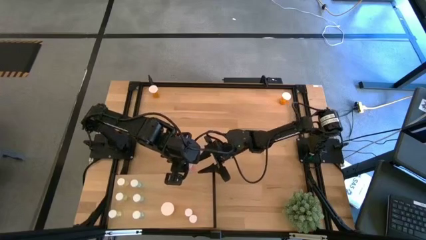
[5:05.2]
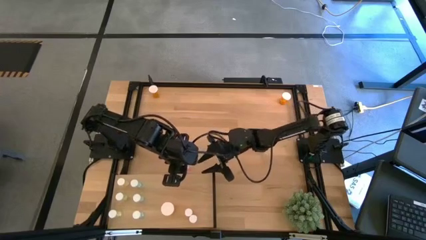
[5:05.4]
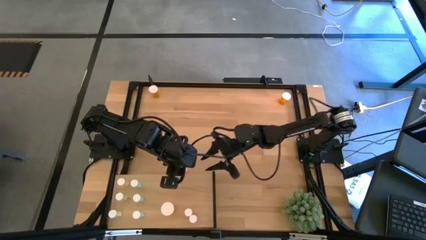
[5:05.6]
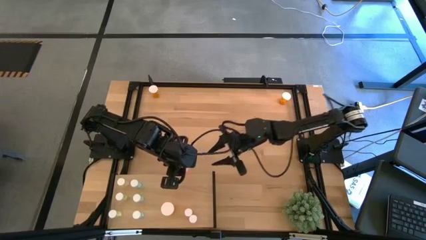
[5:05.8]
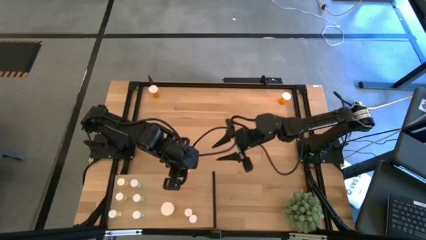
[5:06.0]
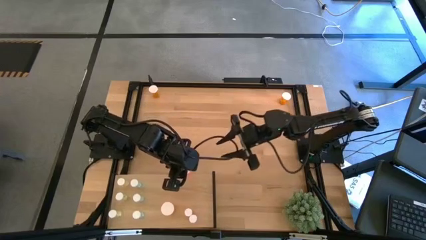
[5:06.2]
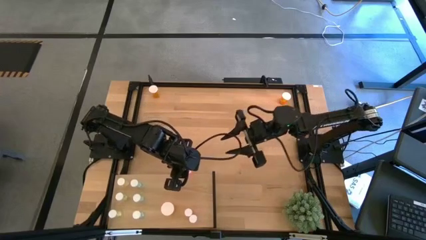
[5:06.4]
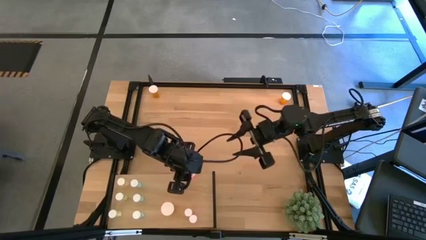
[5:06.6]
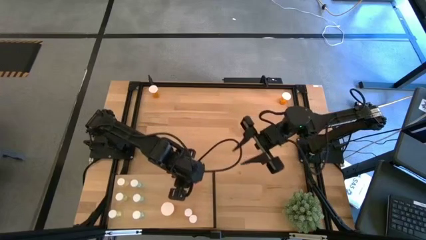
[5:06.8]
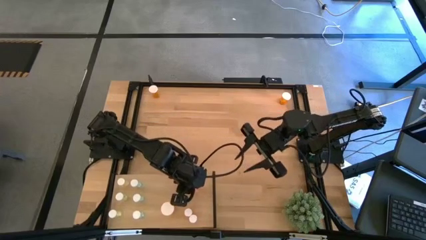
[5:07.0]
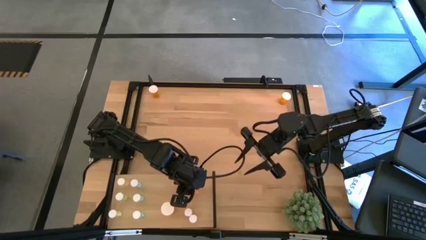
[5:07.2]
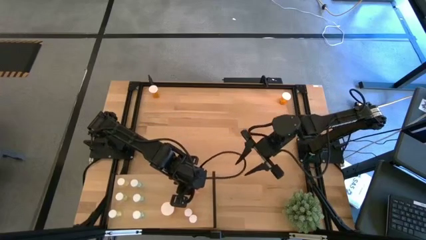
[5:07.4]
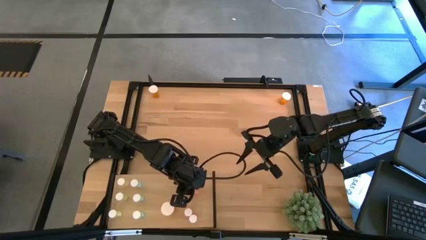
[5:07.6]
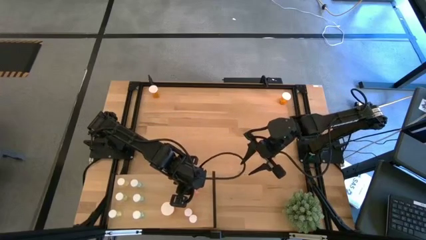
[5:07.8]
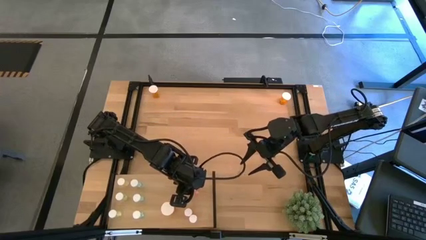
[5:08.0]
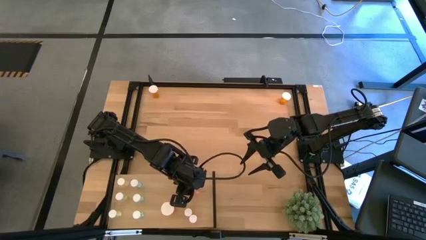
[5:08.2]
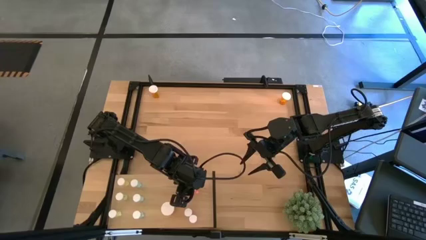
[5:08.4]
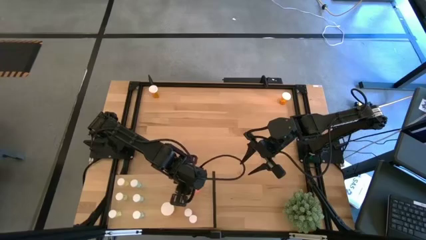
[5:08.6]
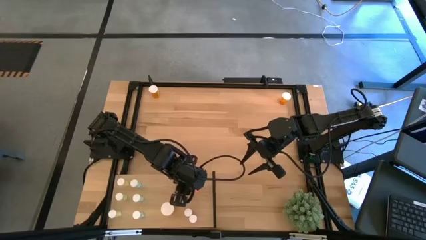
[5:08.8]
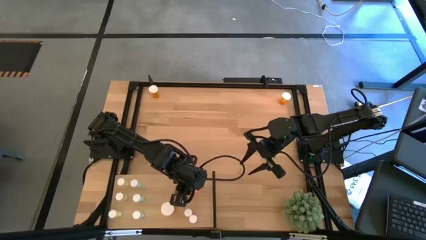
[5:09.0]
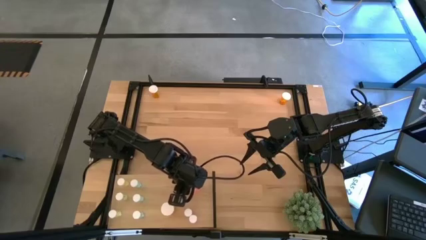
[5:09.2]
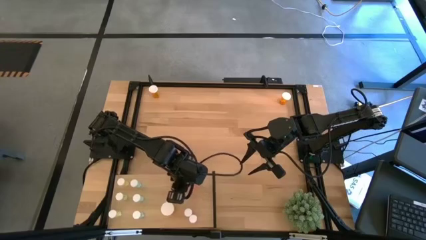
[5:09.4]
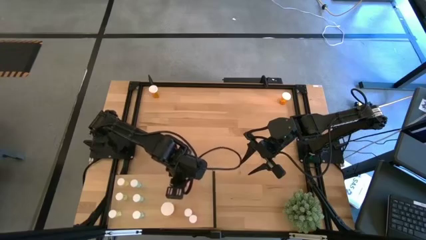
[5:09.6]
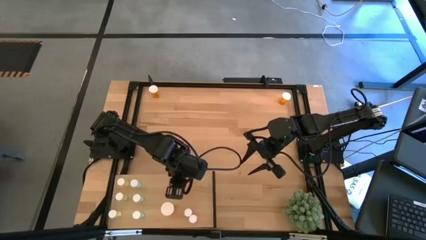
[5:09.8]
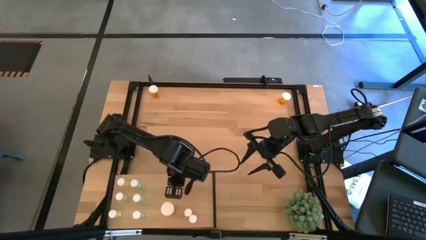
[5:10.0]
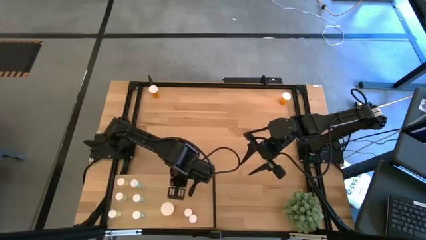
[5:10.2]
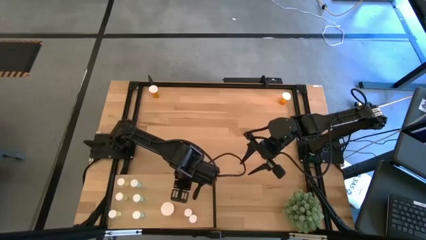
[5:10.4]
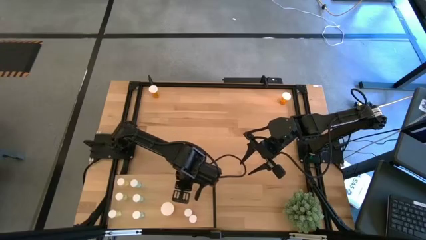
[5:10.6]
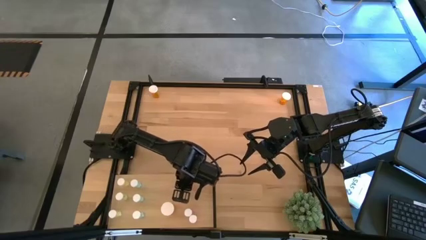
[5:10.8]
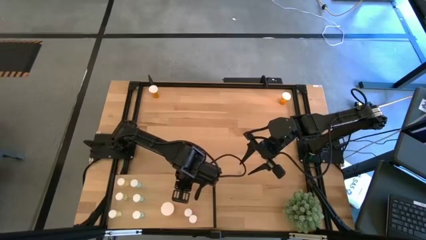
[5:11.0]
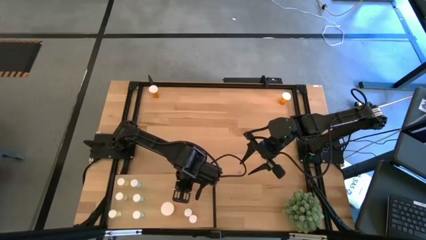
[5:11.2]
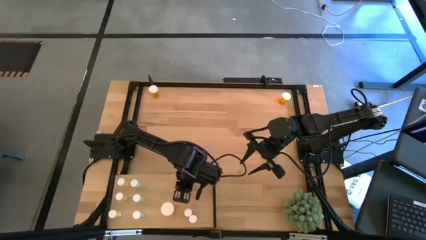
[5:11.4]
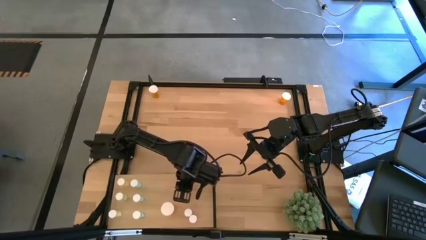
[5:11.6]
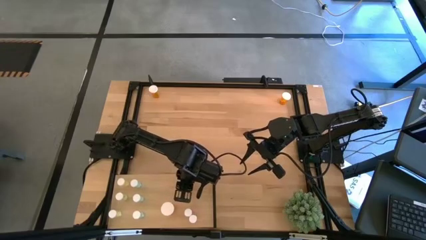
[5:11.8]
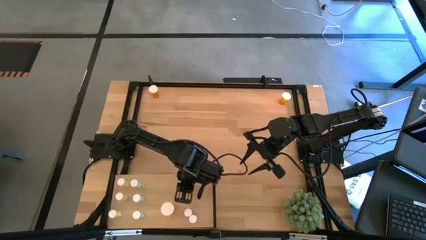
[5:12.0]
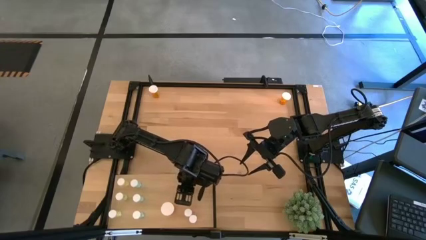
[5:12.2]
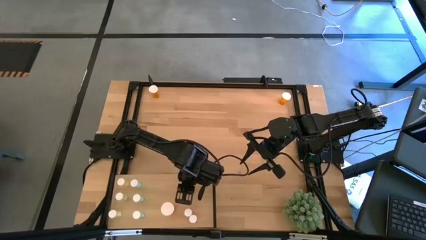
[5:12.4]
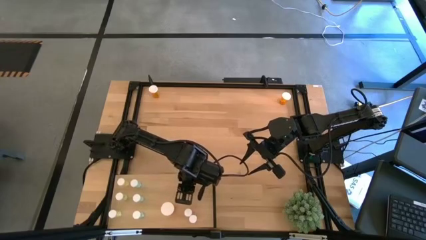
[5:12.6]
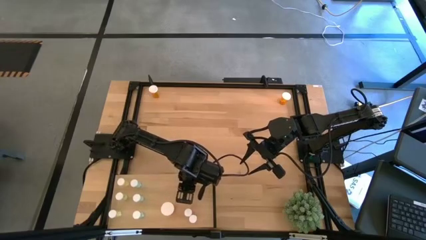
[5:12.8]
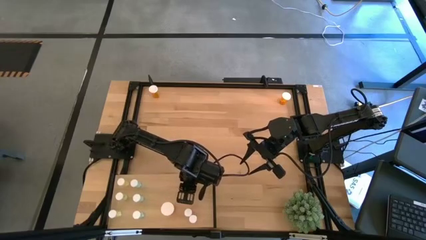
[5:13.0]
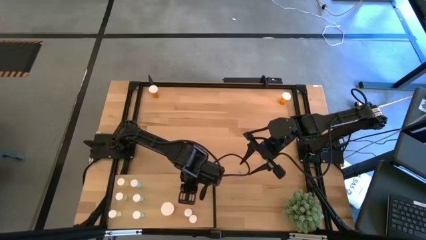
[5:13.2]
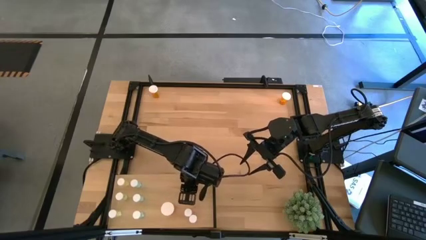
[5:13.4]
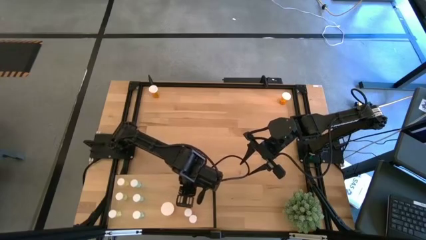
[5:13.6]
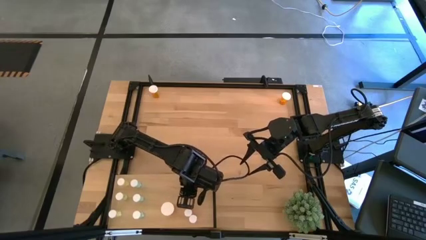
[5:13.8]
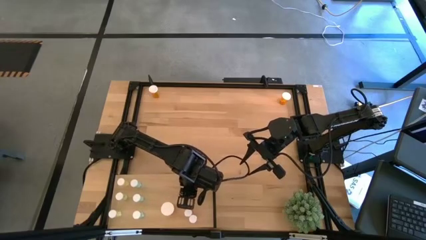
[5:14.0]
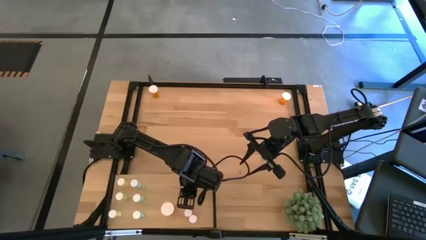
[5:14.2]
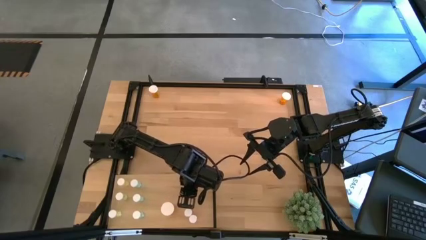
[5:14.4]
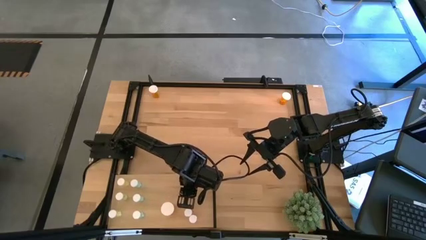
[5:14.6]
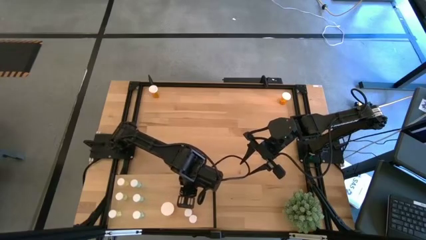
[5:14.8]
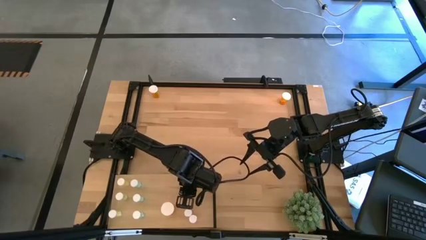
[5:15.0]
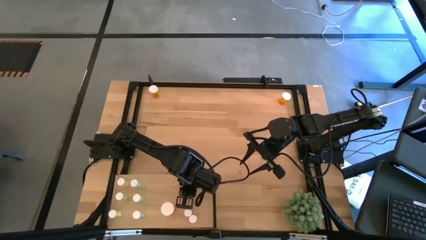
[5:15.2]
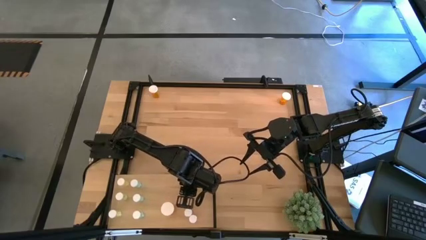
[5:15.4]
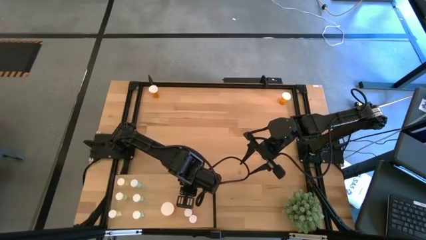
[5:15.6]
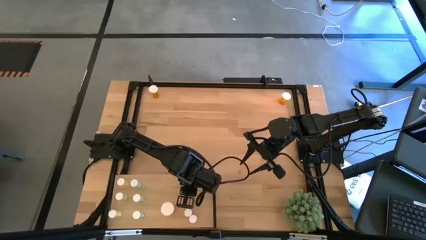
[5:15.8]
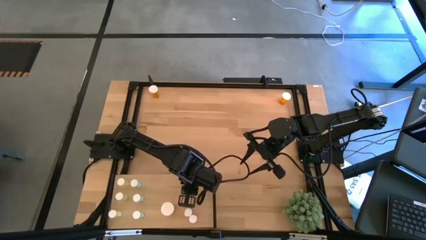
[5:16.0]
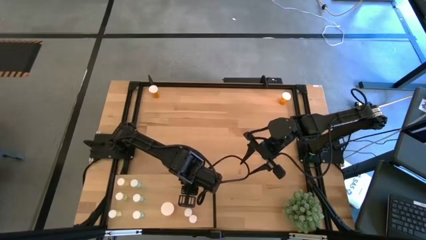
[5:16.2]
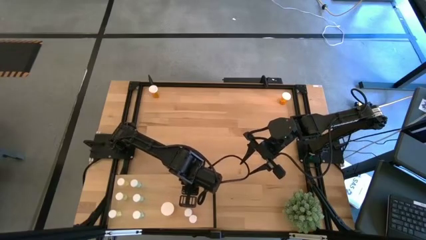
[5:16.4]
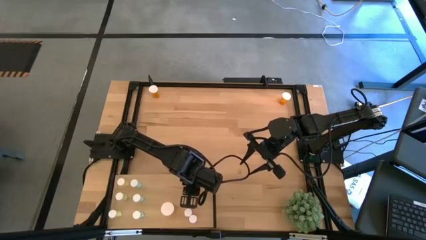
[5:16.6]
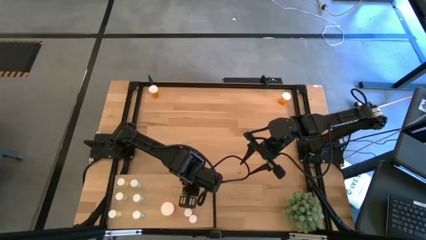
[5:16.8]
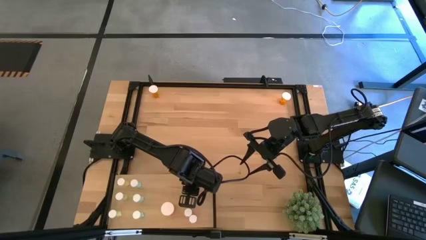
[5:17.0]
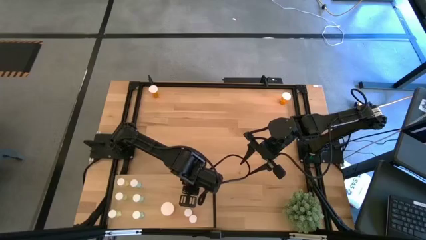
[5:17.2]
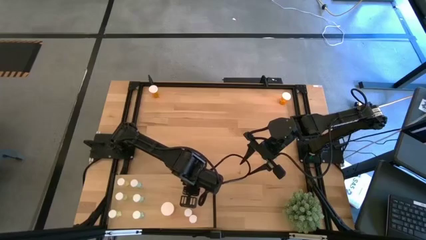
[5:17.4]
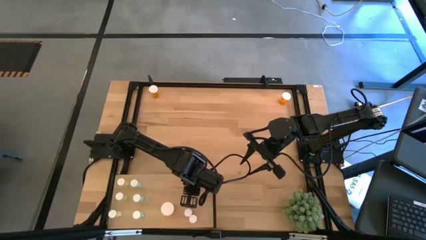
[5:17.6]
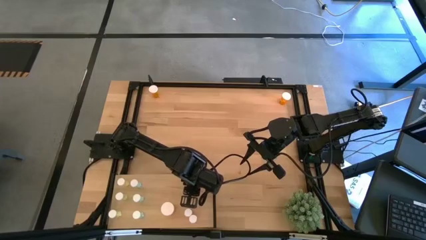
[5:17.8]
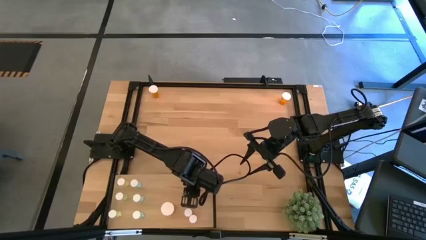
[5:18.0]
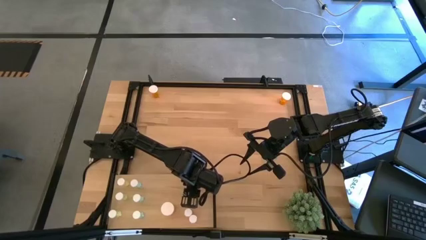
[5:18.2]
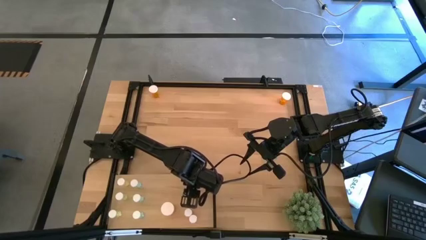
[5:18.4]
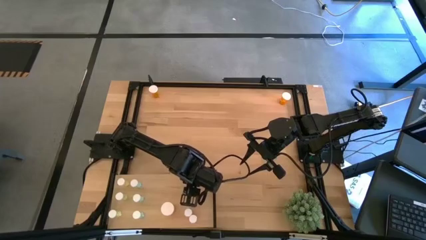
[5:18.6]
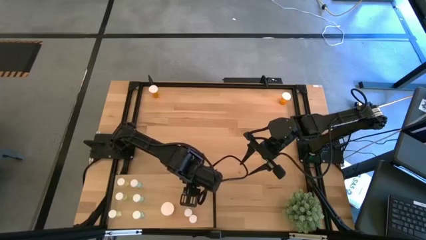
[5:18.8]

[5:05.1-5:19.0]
Task: Pick and place medicine bottles onto shelf by color
Put the pink pill bottle on the shelf aligned with the other pink pill bottle

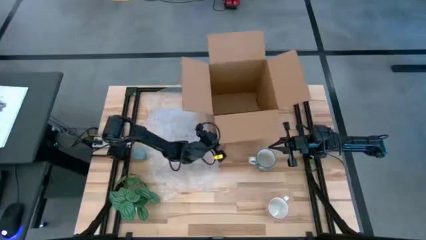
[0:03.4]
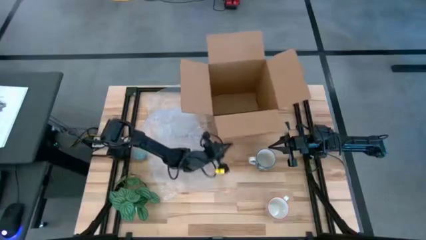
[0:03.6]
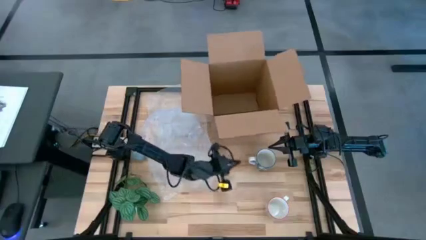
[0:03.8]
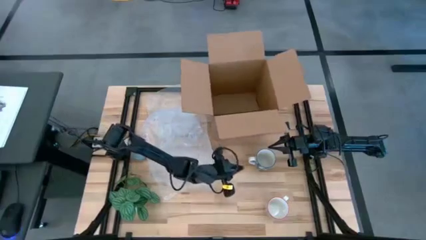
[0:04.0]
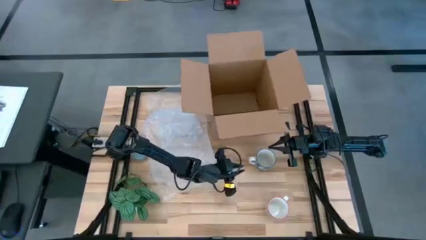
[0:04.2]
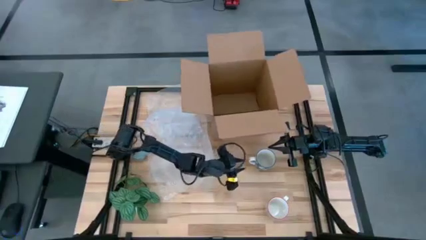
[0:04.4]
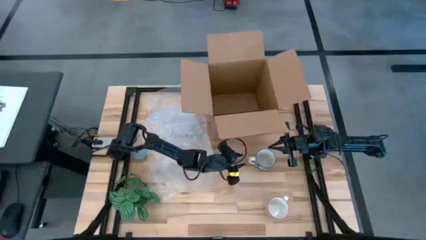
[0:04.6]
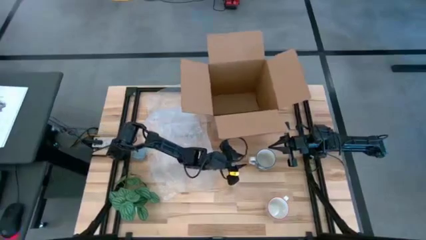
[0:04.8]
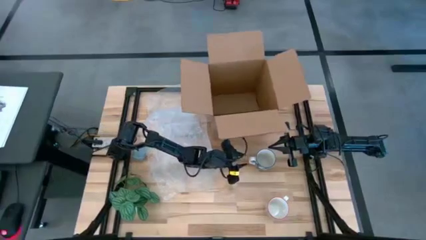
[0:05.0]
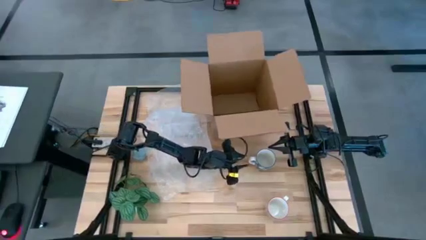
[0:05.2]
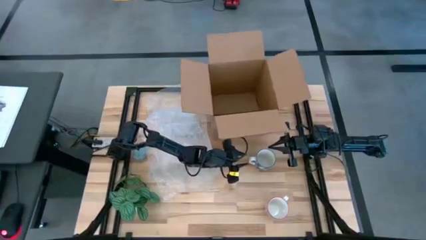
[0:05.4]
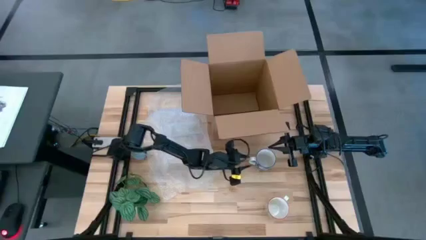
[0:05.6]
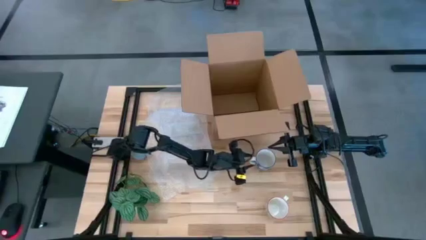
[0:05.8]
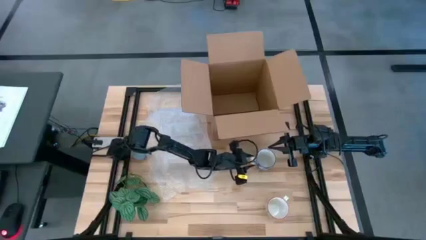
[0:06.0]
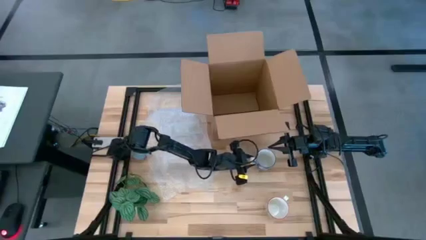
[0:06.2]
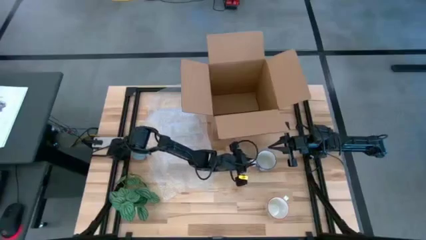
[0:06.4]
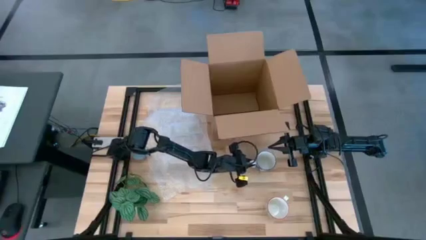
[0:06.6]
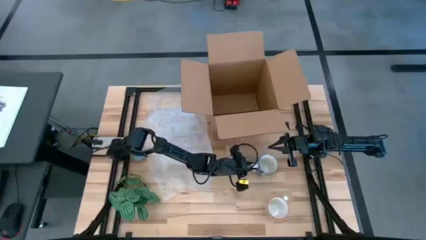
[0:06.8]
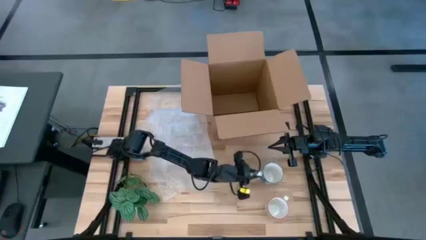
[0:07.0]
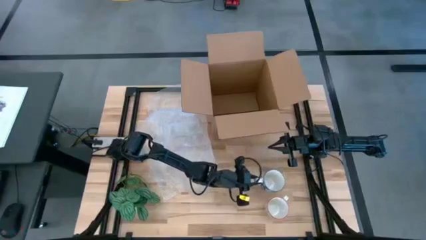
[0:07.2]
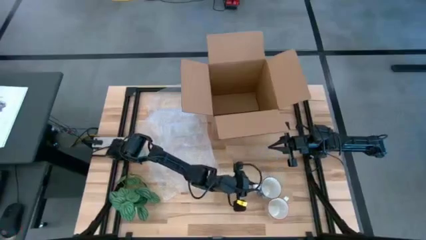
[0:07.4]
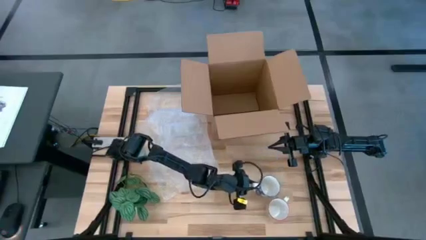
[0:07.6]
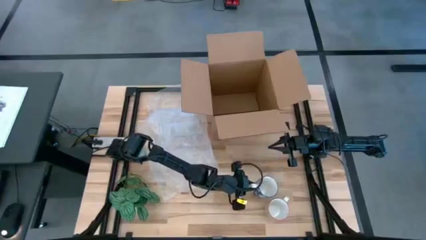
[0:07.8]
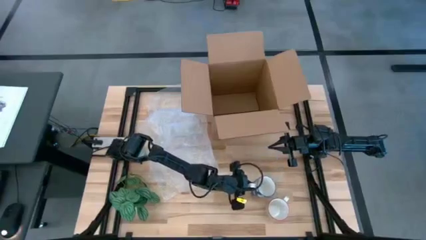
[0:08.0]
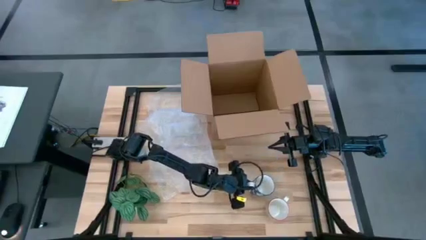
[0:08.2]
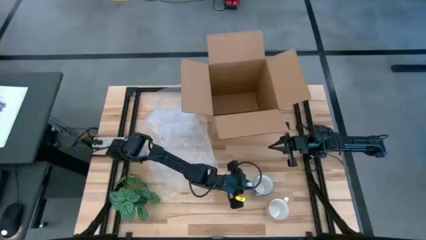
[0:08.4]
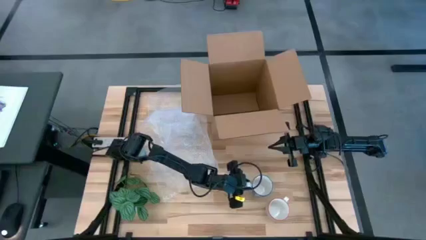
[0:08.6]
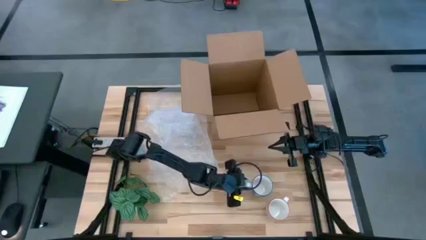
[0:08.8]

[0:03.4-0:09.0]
Task: wrap mug
Move the white blue mug to the bottom right of the table
